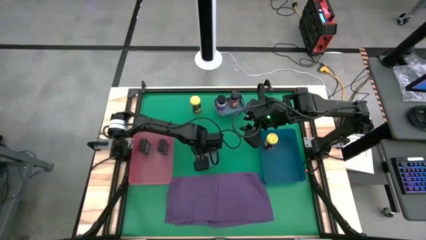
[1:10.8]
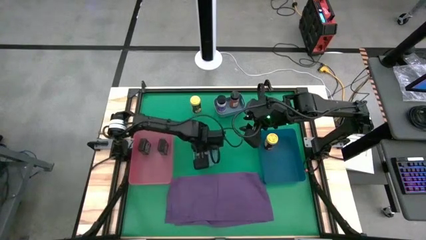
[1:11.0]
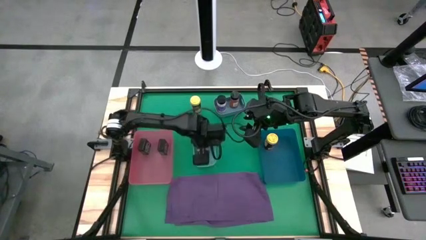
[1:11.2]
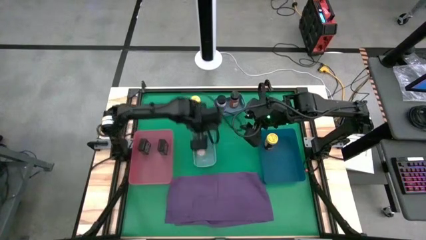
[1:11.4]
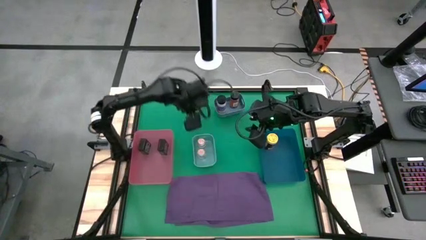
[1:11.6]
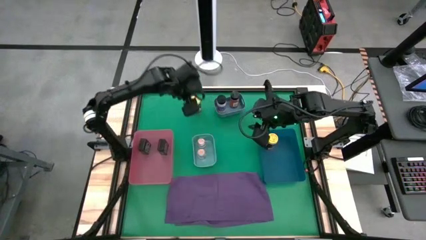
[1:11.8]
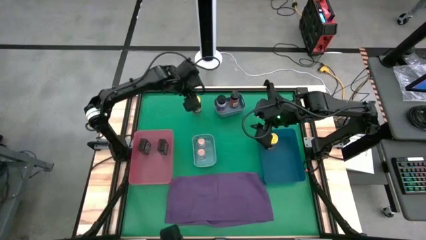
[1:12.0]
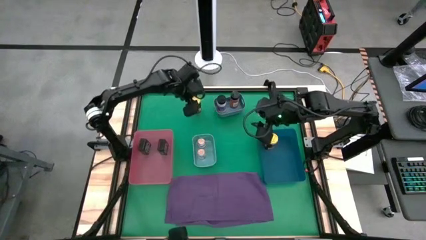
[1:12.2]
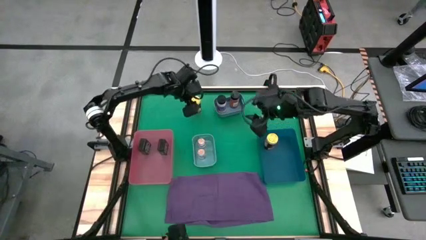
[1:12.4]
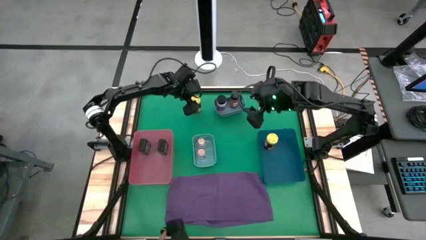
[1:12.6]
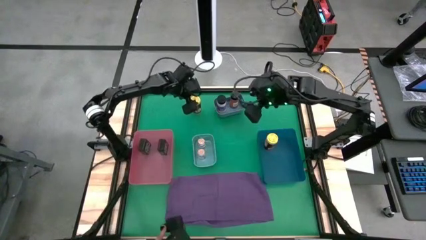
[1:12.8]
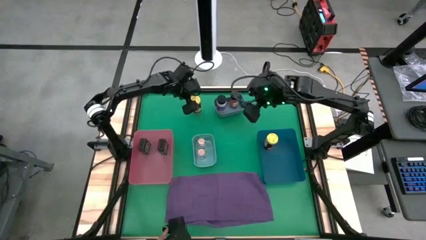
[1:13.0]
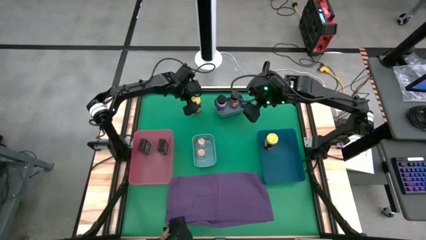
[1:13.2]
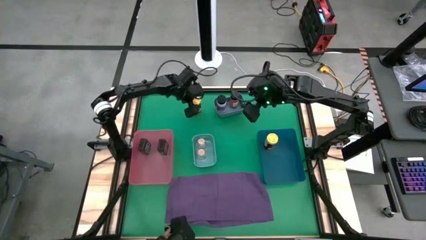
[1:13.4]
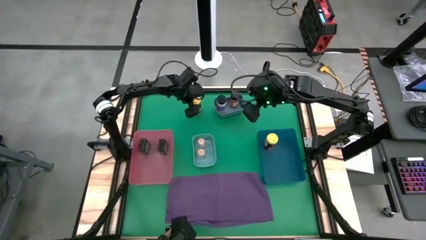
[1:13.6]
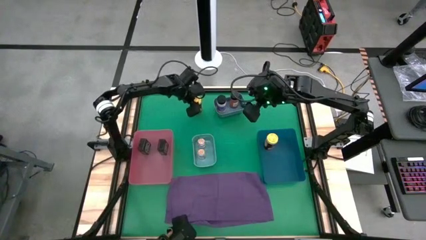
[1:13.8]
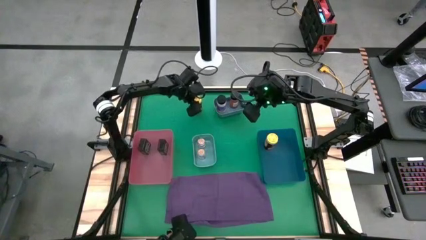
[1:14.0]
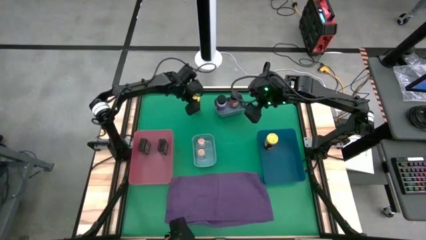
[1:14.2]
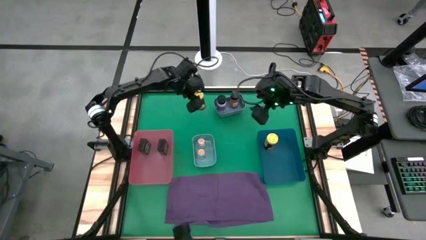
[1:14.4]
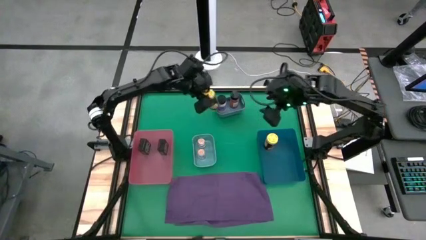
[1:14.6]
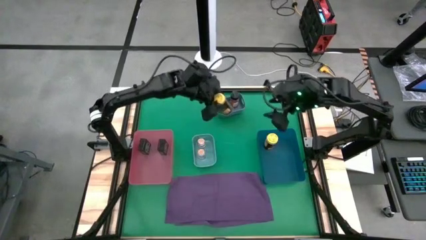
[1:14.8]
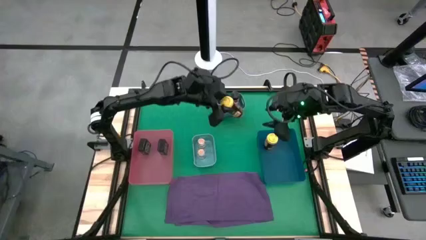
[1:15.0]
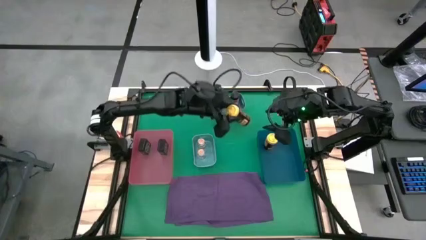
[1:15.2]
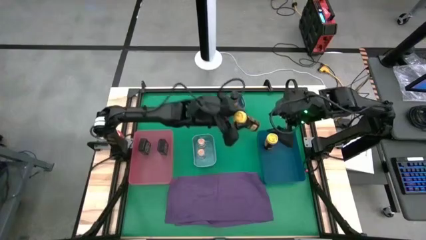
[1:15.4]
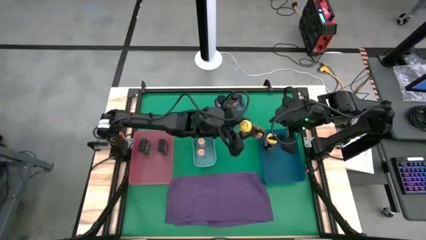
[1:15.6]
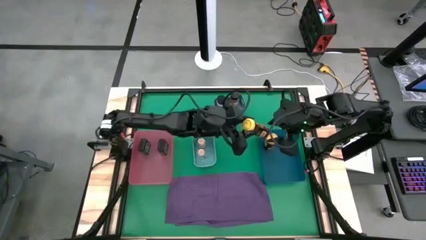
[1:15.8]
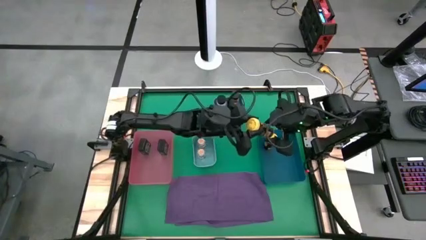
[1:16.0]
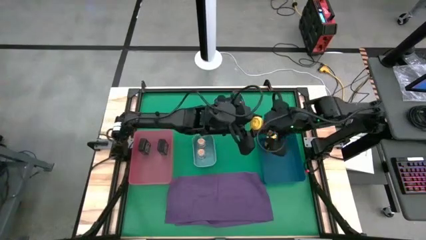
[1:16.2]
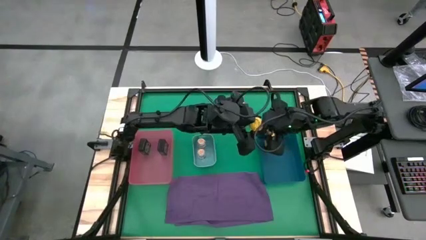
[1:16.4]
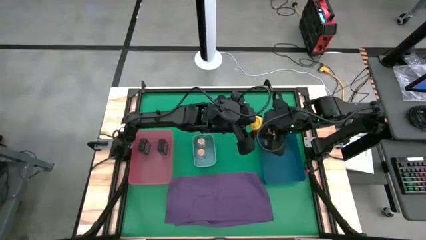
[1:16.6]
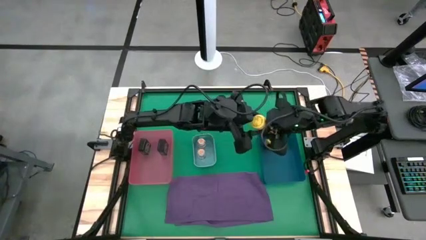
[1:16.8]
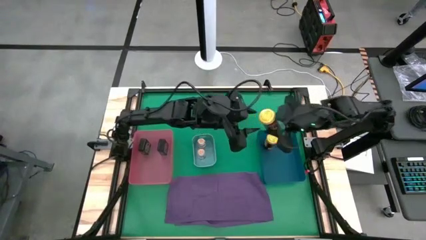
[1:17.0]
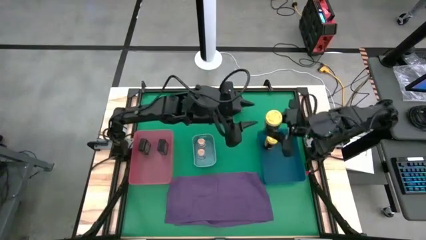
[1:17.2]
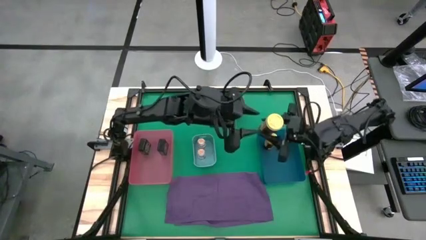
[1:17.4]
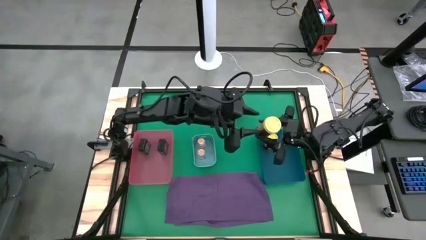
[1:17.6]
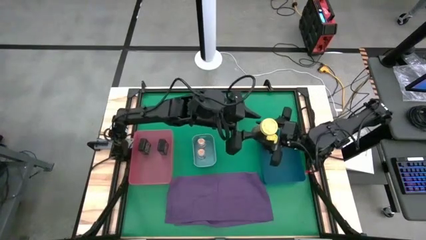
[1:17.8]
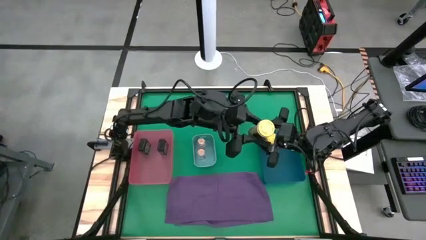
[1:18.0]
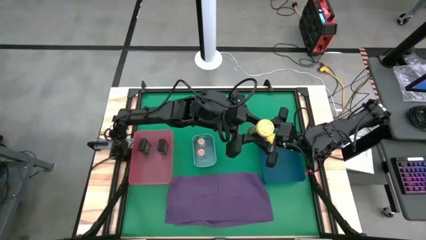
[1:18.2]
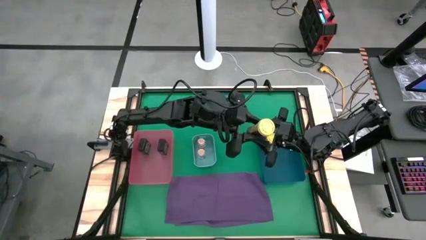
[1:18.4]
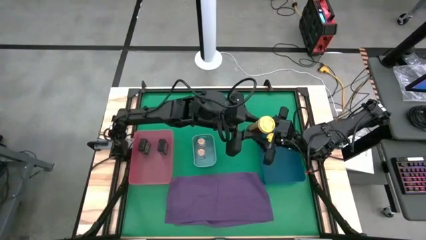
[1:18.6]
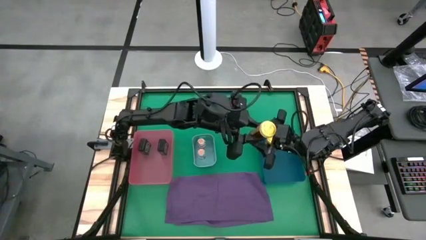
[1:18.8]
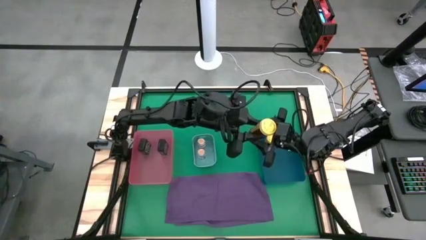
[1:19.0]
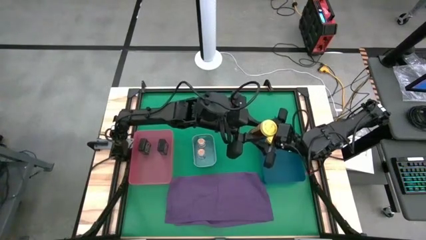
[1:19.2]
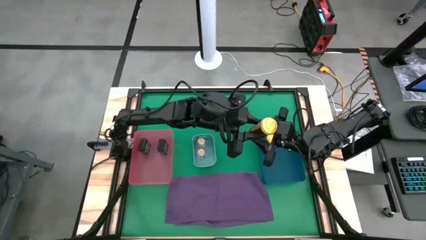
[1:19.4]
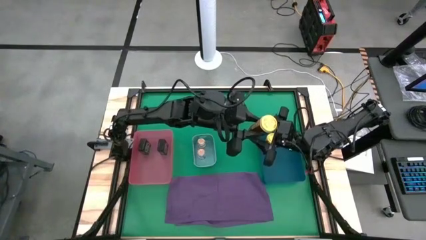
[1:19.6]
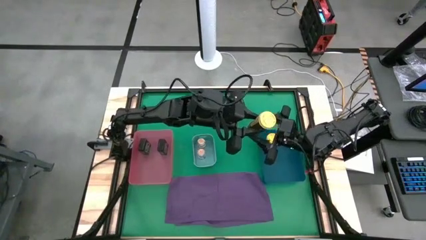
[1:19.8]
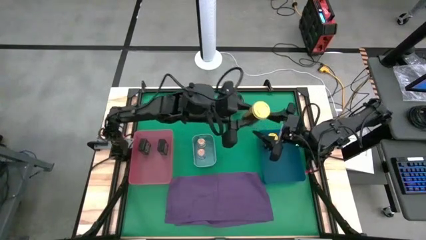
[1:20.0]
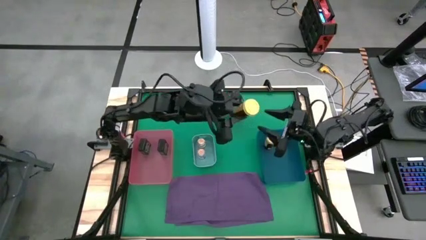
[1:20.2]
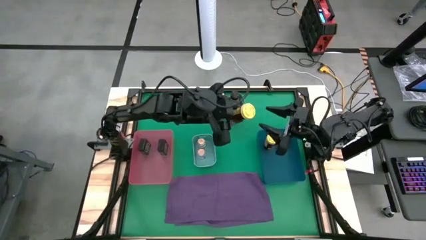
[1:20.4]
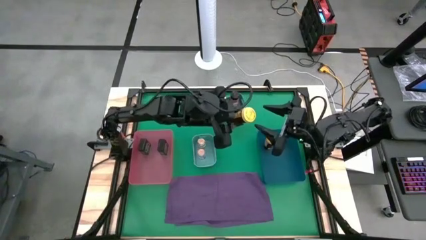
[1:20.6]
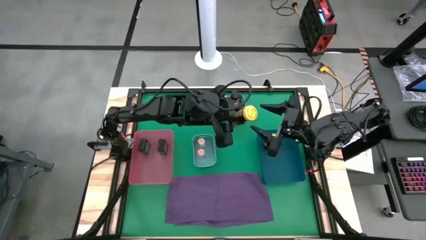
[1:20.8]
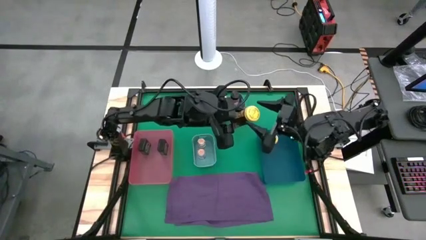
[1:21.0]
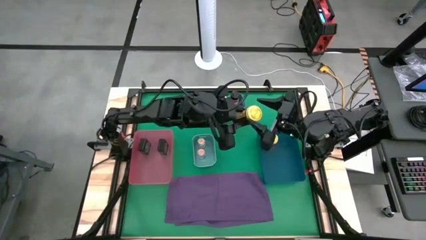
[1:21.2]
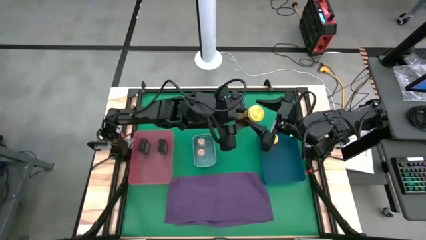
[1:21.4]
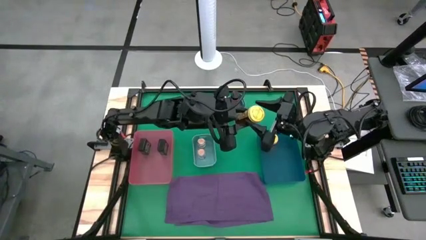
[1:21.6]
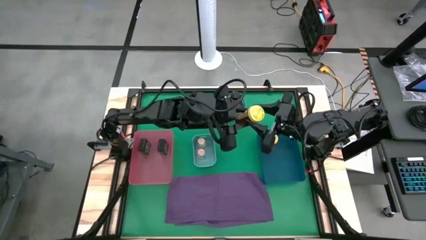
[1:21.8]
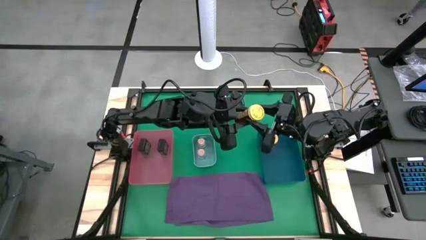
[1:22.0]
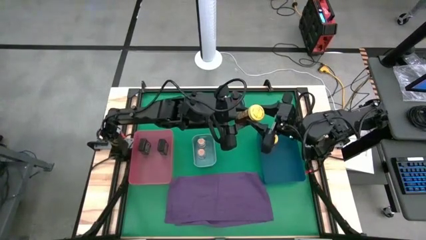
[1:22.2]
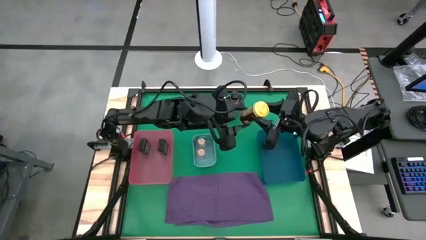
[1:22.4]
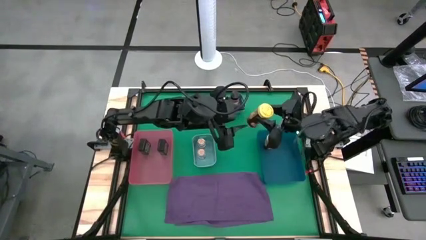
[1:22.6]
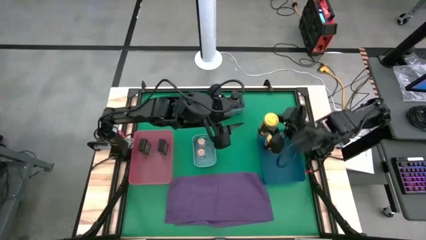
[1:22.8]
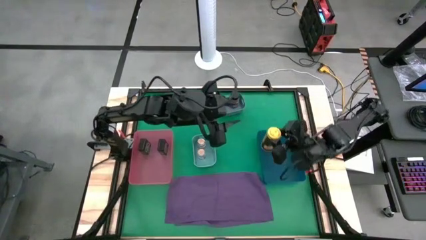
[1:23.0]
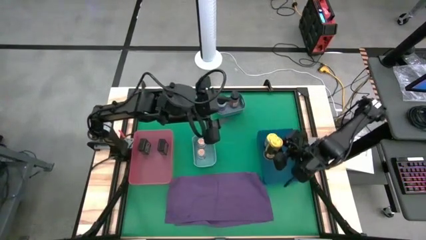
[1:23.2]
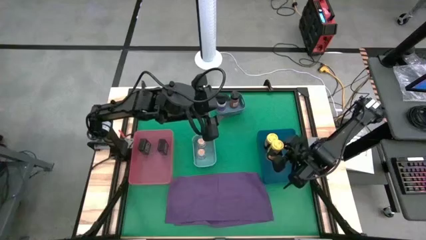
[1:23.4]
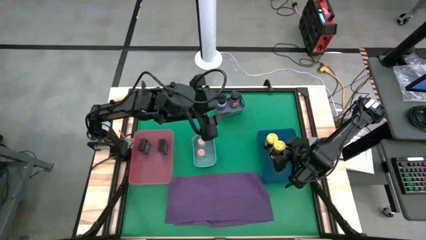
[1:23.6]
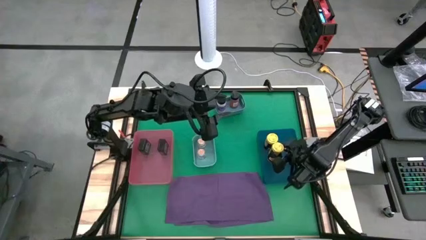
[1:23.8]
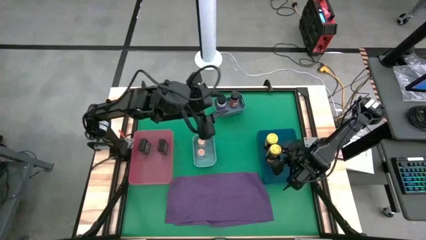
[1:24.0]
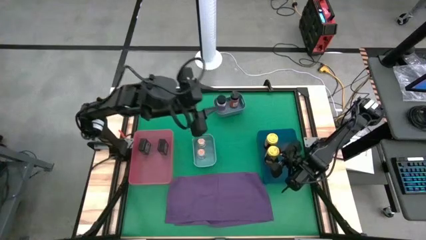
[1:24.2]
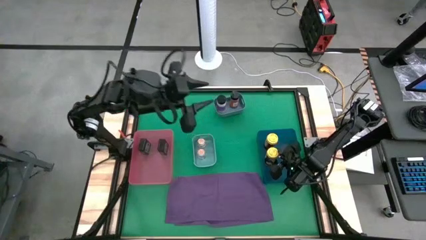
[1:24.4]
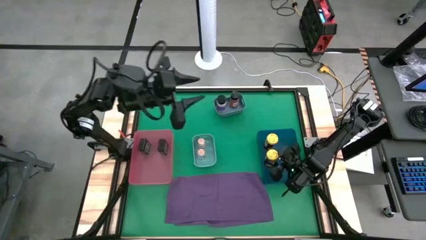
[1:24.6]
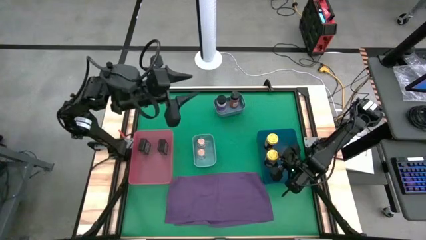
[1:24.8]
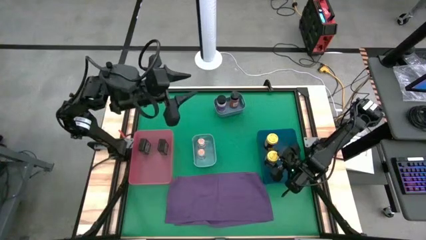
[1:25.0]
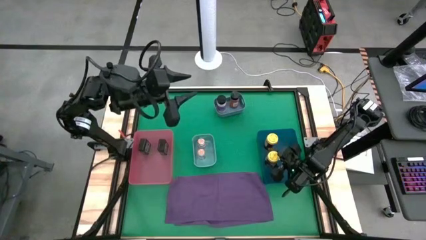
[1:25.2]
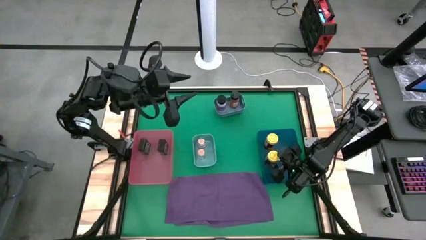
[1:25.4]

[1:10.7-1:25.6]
Task: Sort spices by type
Put the yellow seasoning bottle into the blue bin

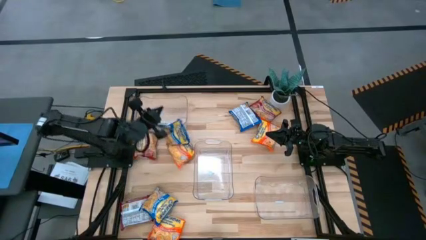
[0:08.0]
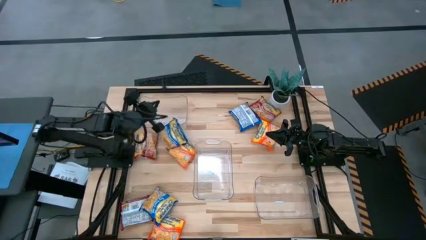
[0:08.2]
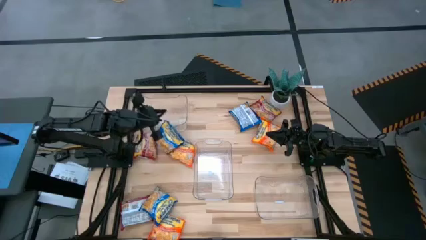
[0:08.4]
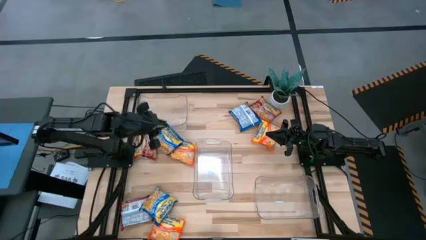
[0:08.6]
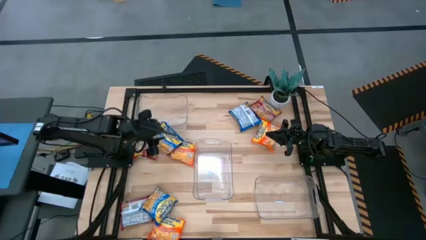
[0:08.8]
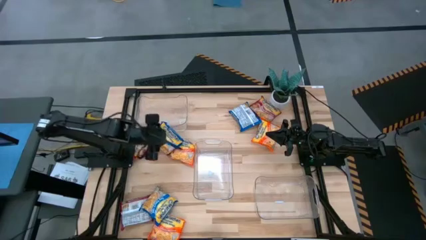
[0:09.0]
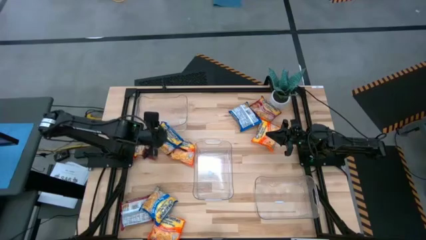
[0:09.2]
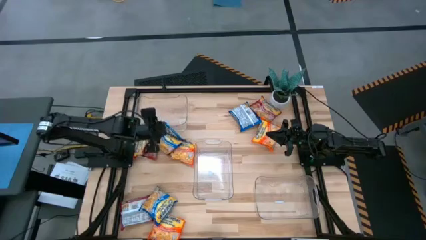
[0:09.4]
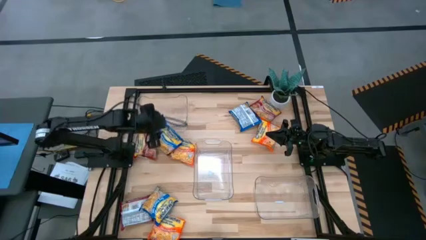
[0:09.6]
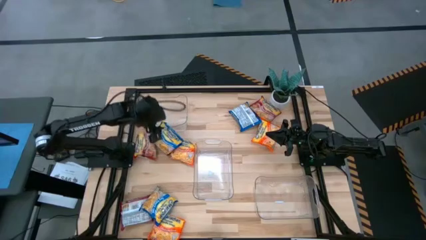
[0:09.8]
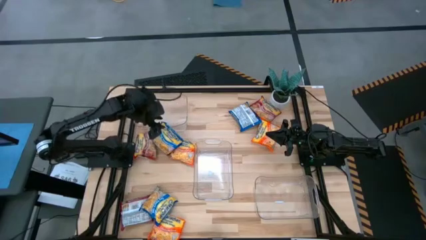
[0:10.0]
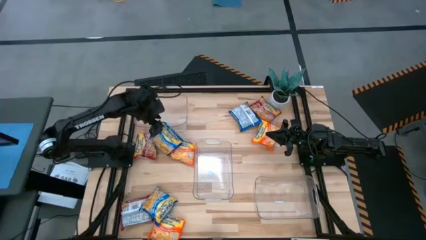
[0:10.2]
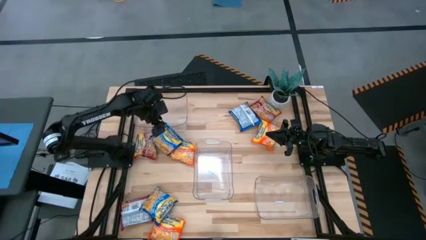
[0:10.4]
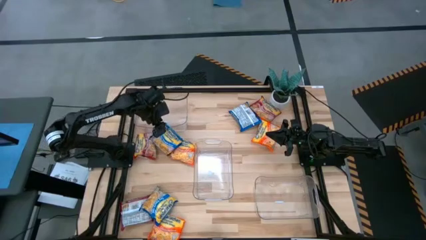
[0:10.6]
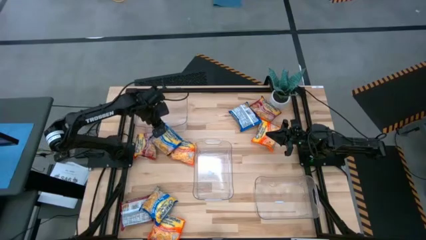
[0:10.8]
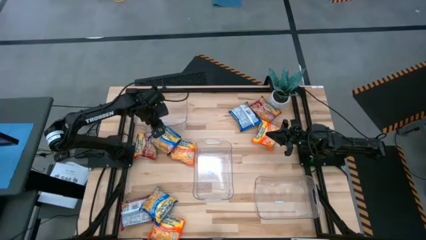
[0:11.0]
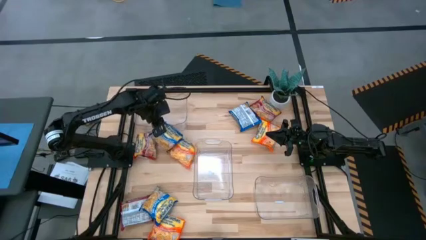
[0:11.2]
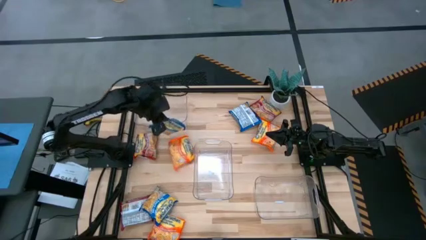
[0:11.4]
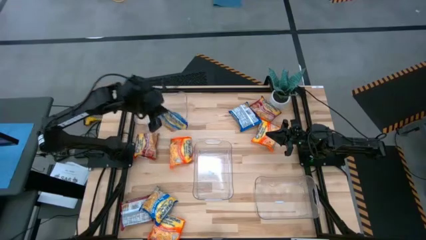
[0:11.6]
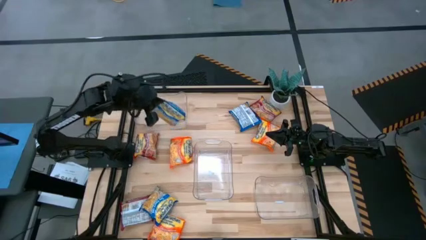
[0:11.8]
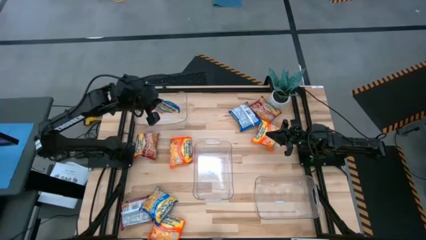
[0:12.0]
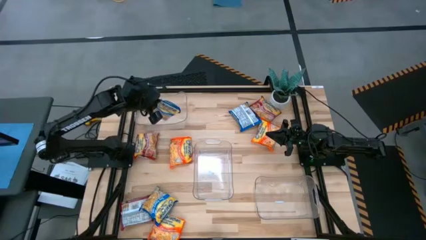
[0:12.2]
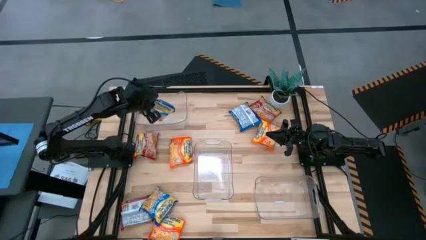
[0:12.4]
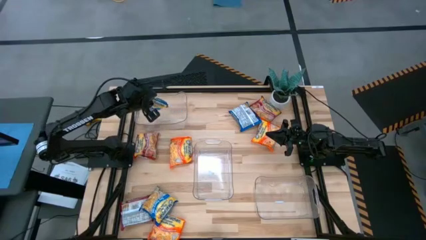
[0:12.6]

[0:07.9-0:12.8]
Task: Sort Maruchan noodles
Put the middle left blue noodle pack into the top transparent bin
